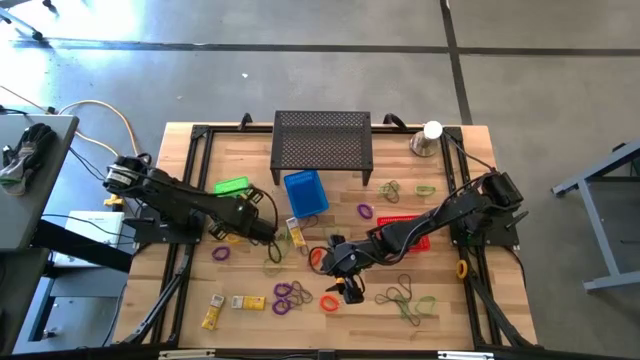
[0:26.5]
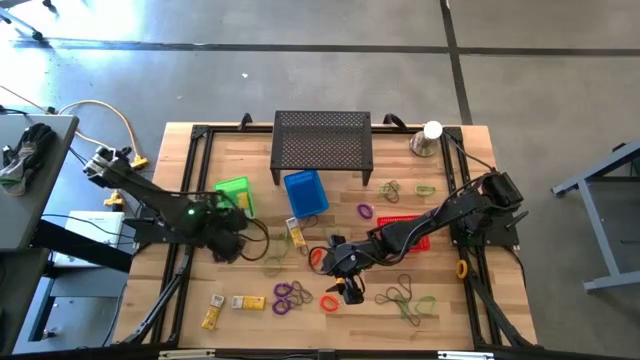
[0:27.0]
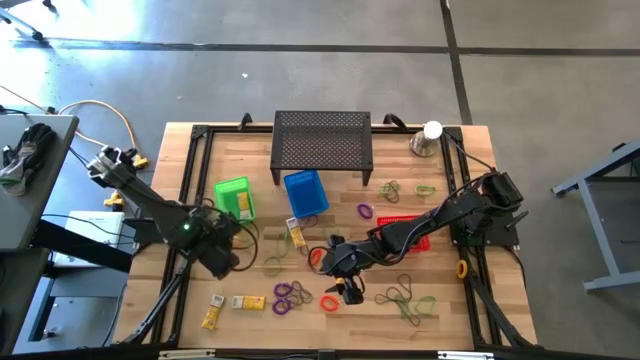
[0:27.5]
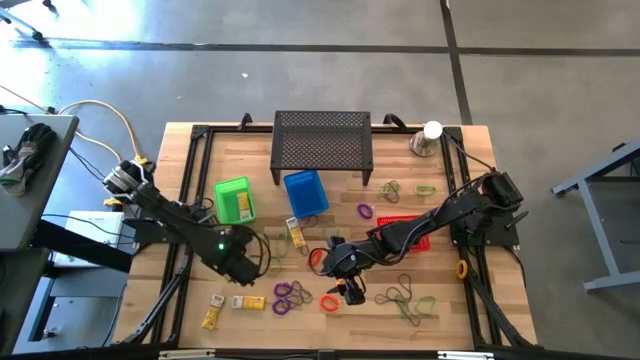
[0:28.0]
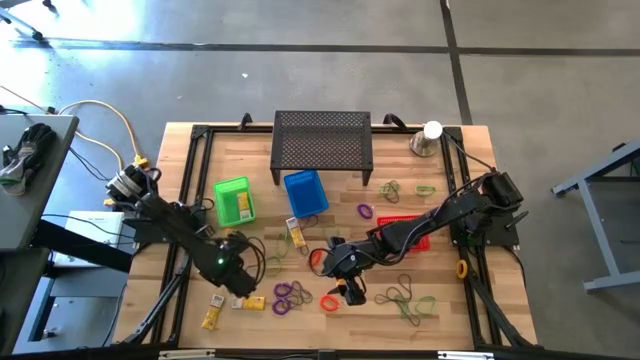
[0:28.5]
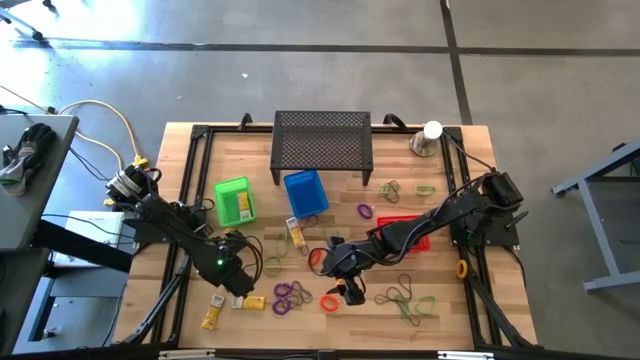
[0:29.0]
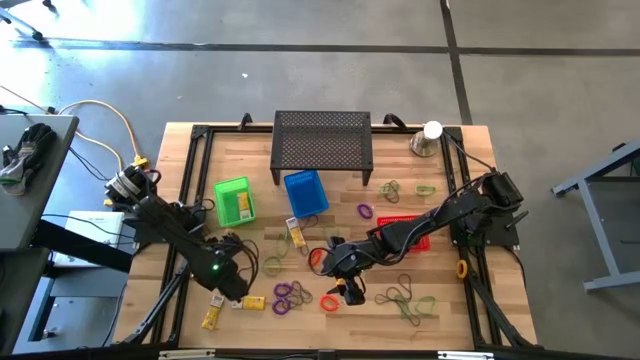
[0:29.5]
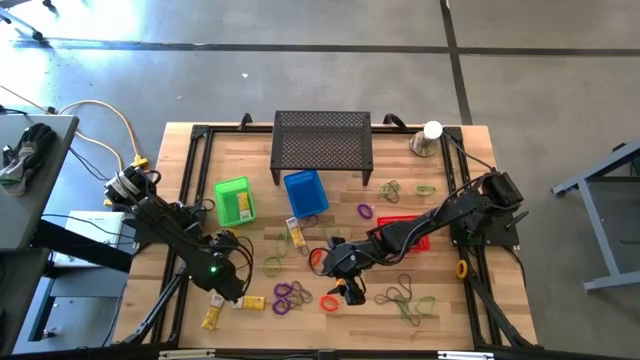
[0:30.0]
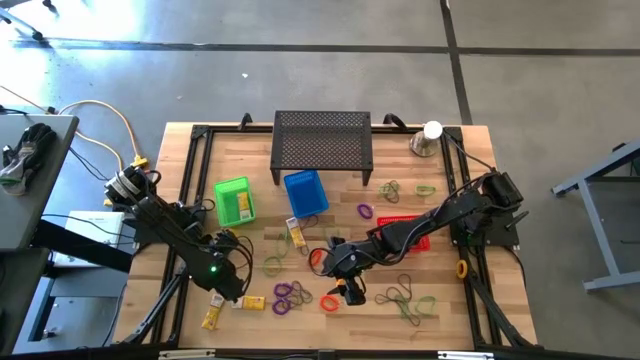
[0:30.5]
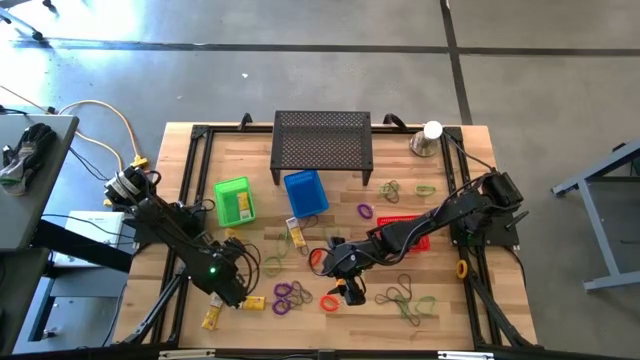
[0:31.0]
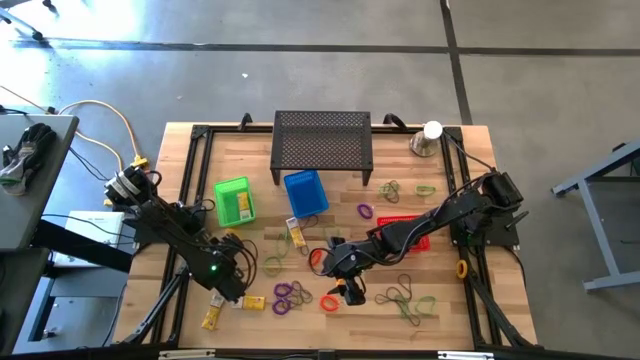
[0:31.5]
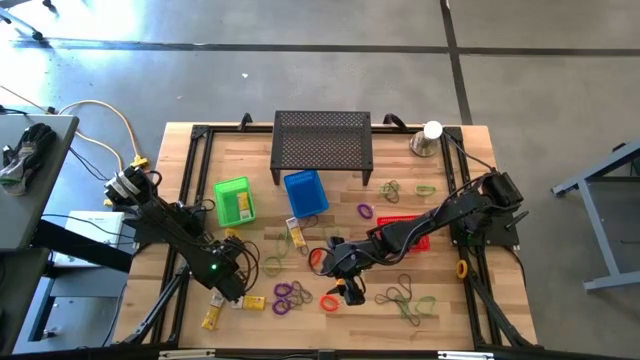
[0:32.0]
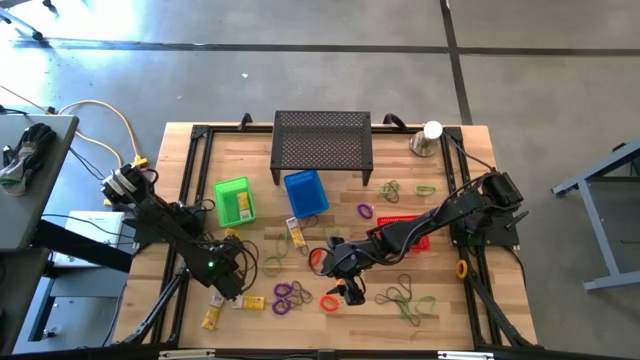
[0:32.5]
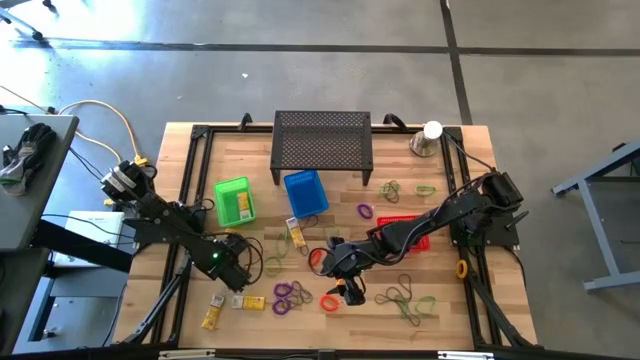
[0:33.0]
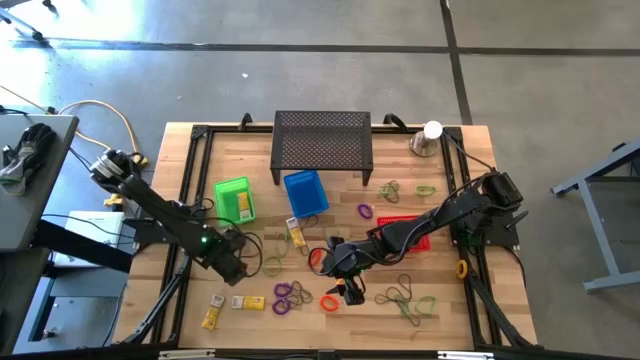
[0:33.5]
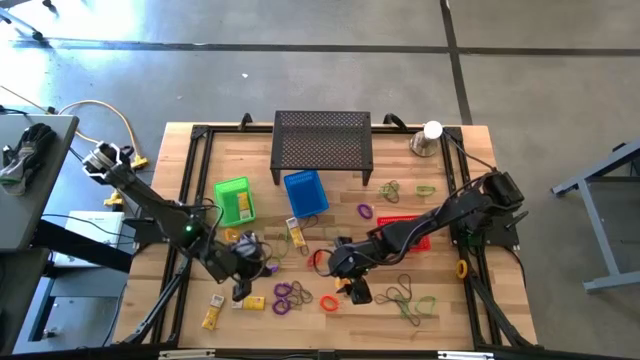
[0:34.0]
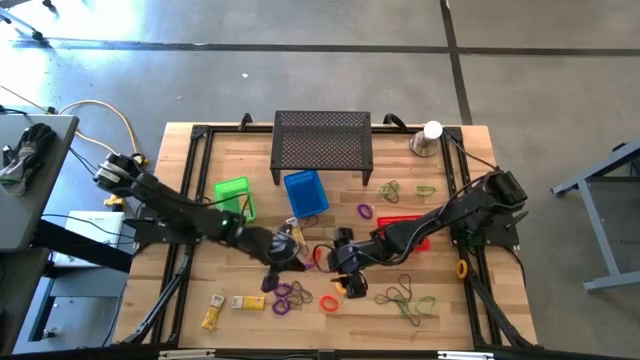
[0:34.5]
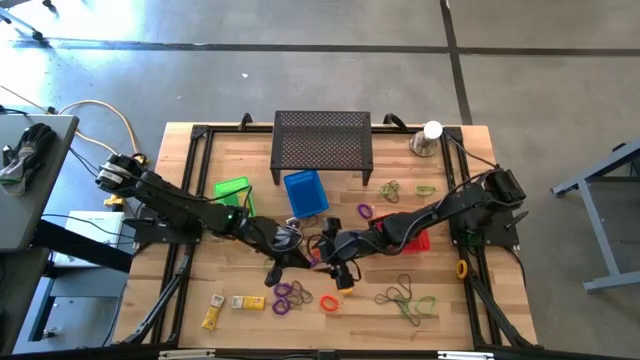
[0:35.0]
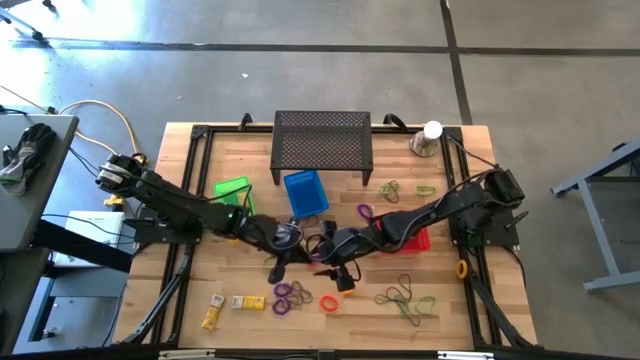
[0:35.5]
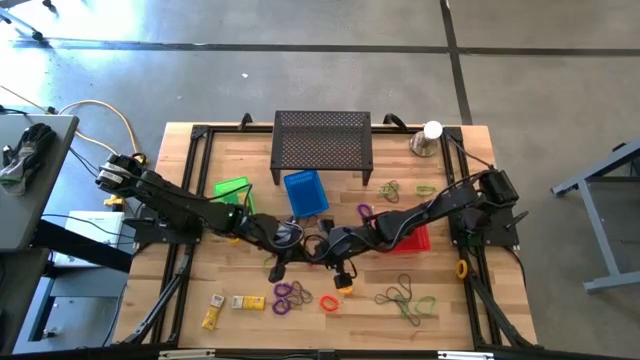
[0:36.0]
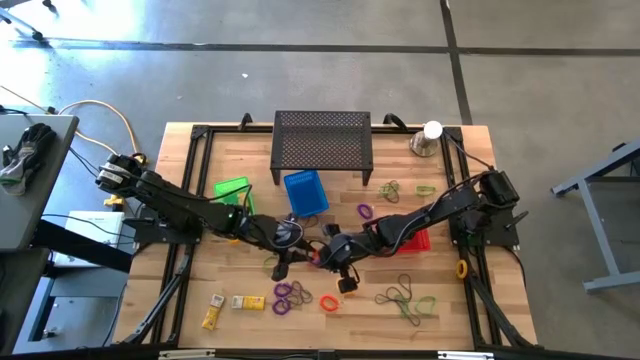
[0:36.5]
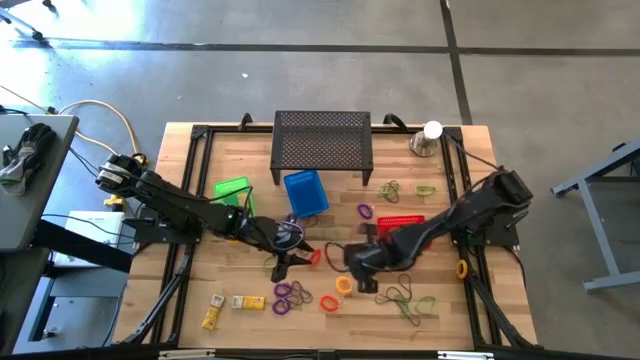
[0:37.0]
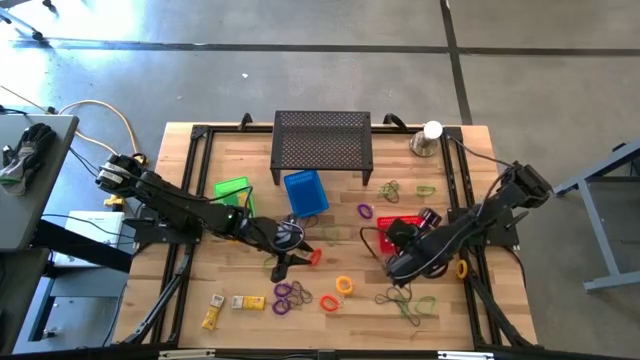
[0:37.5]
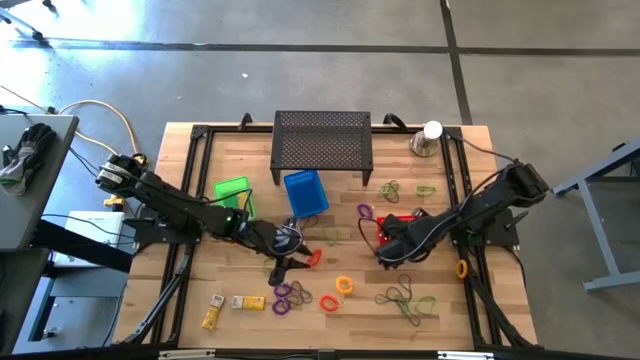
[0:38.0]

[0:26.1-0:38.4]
Task: Pick & Place Office Desk Supplies
Put the violet spring keychain into the red basket

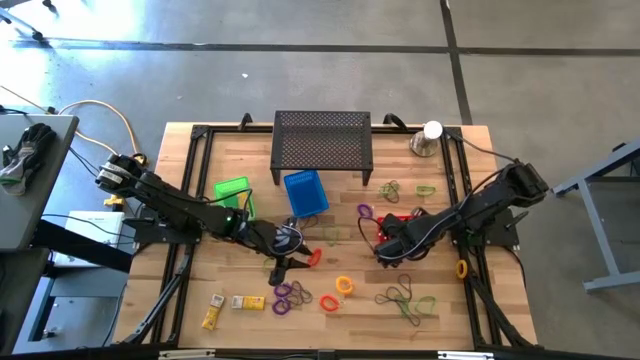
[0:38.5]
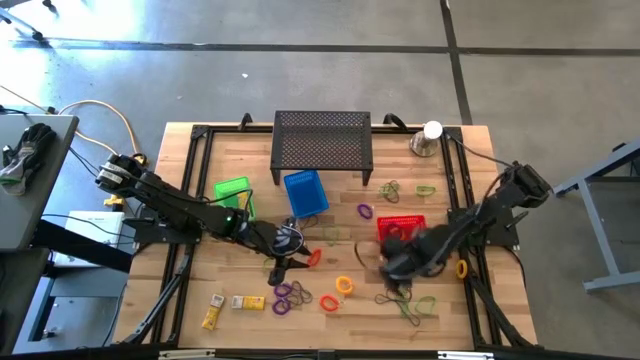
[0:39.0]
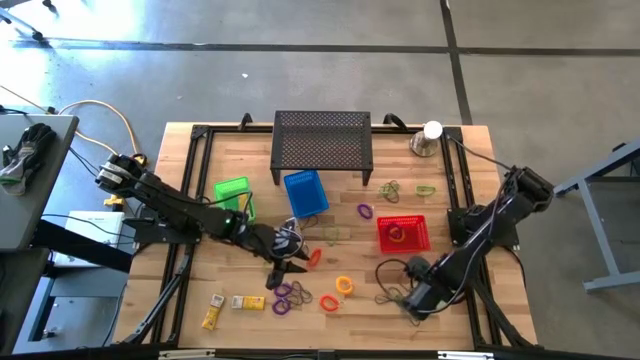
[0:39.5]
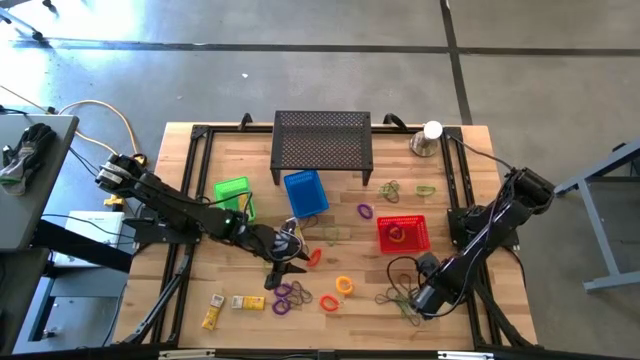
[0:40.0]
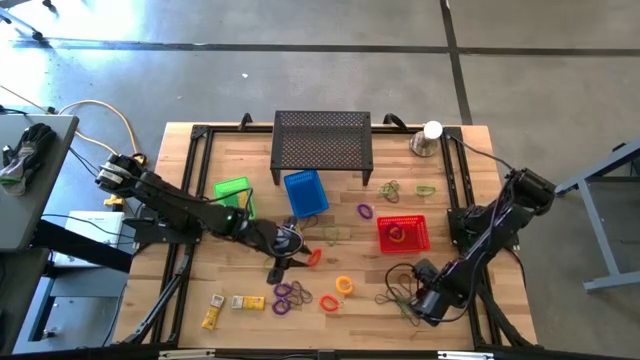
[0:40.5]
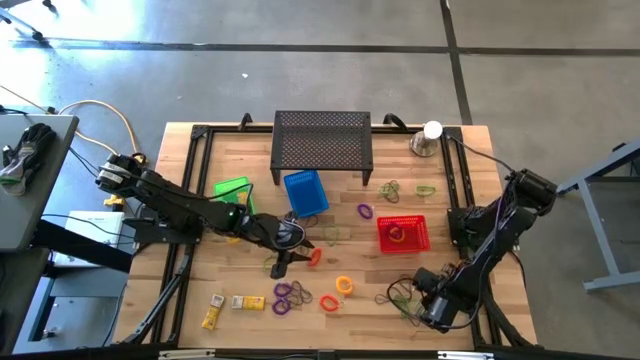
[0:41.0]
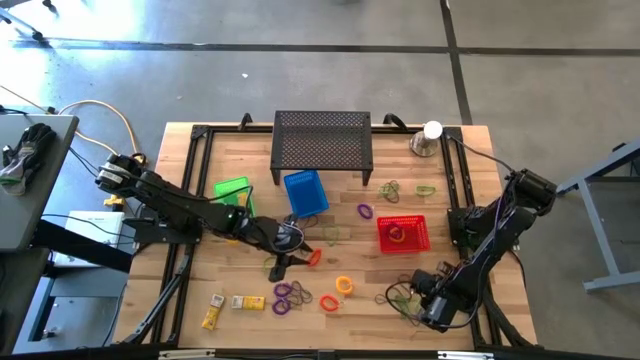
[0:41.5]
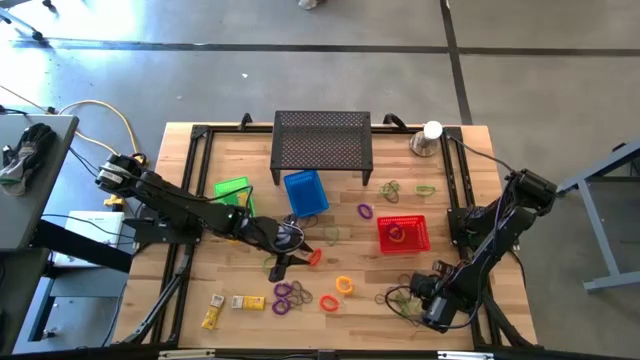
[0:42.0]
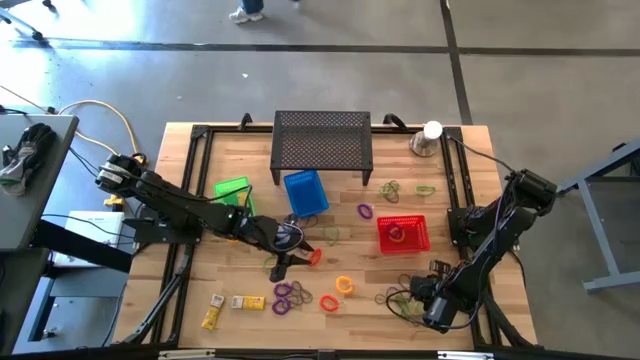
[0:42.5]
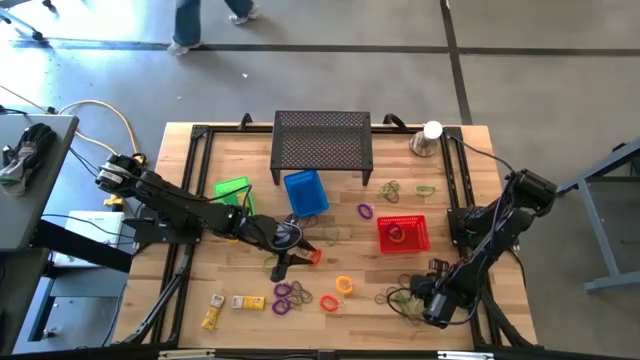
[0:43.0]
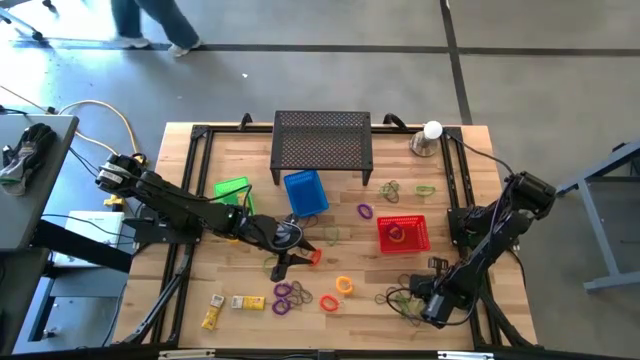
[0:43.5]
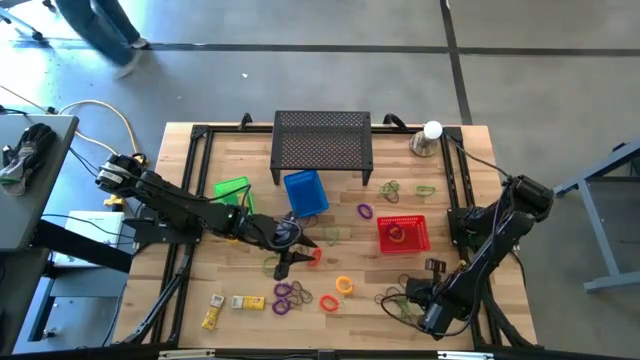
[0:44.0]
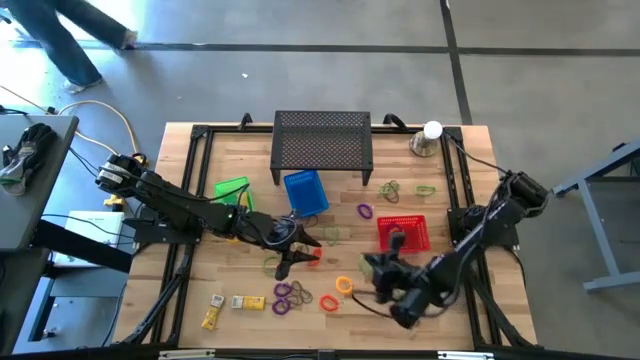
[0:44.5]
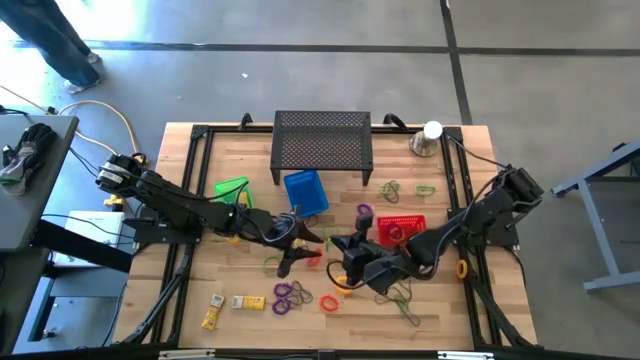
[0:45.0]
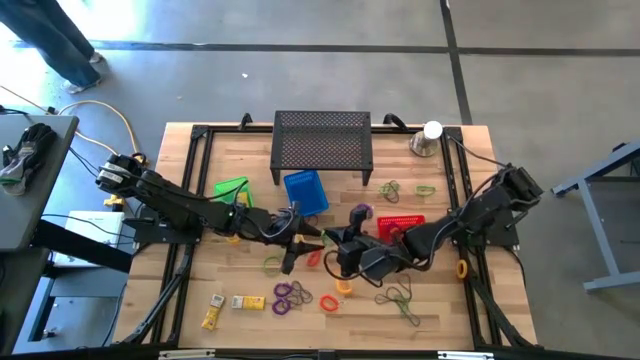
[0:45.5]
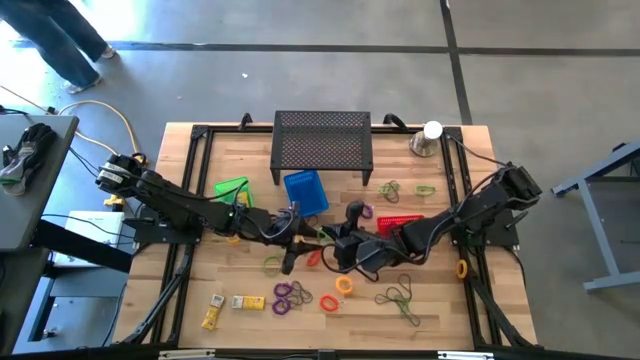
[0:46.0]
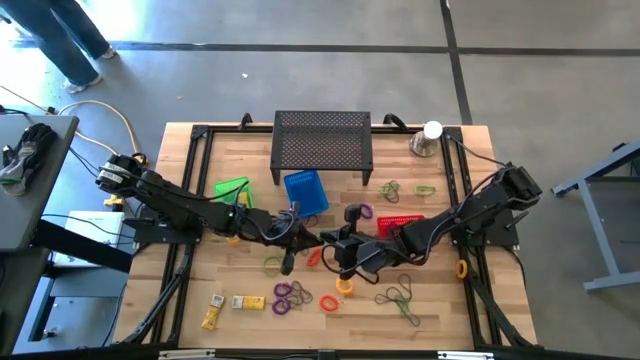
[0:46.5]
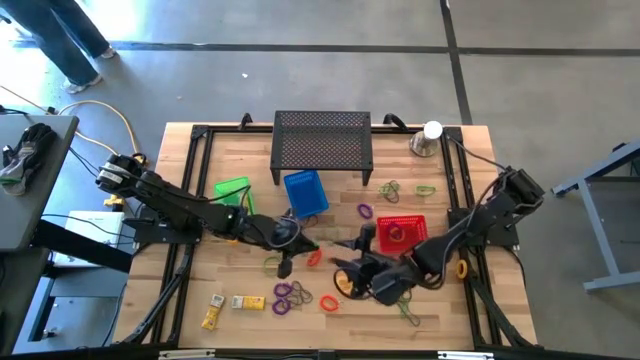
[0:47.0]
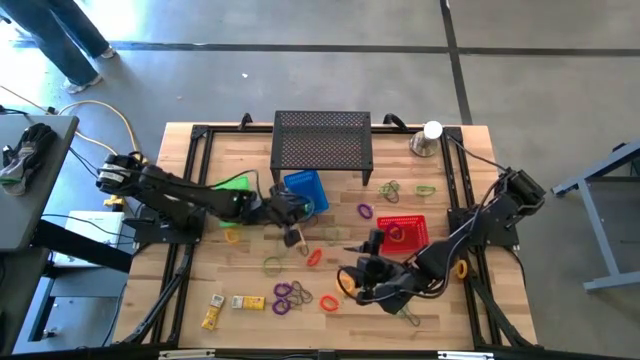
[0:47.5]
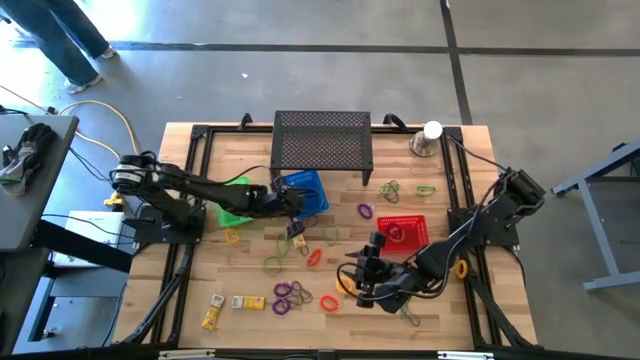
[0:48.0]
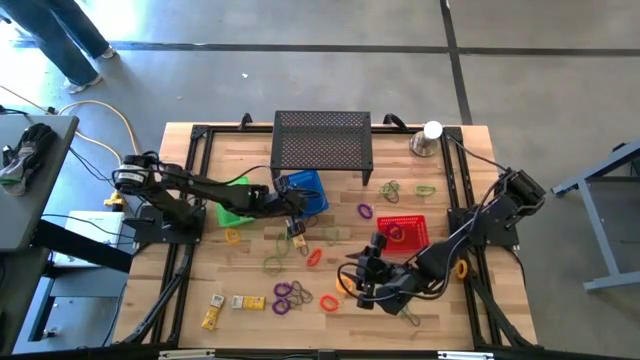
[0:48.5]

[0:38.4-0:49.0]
Put the green rubber band into the blue basket
